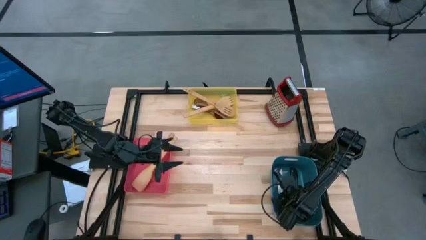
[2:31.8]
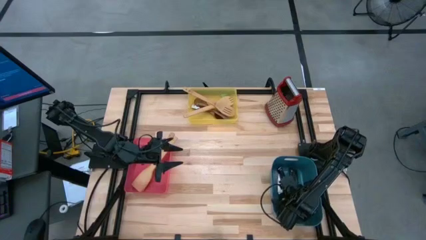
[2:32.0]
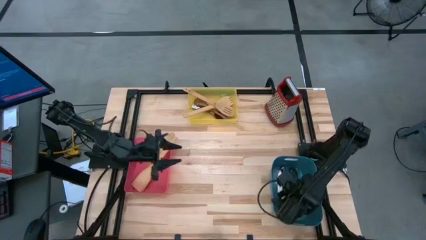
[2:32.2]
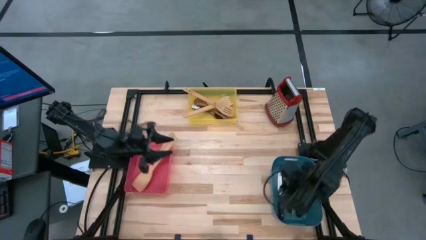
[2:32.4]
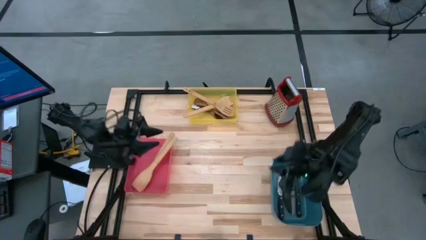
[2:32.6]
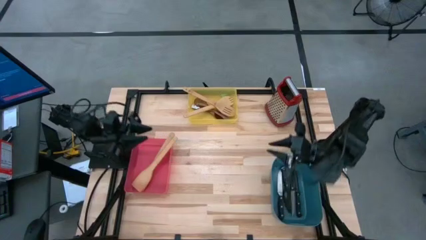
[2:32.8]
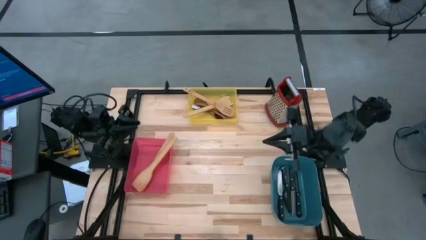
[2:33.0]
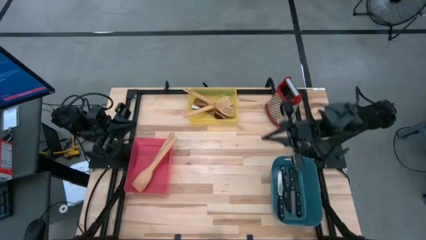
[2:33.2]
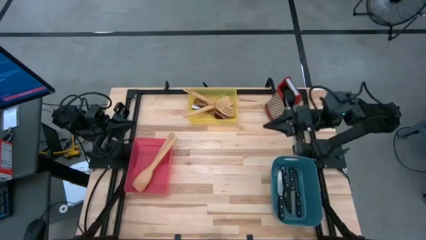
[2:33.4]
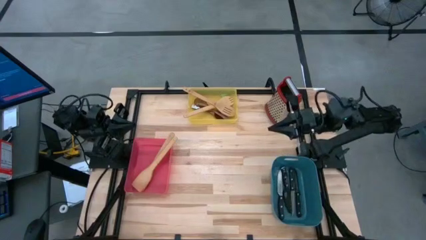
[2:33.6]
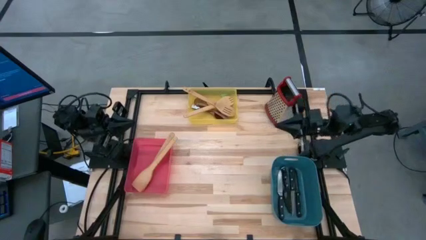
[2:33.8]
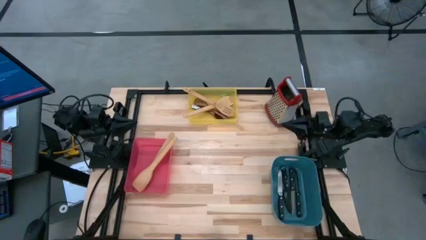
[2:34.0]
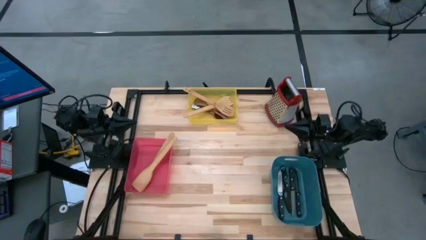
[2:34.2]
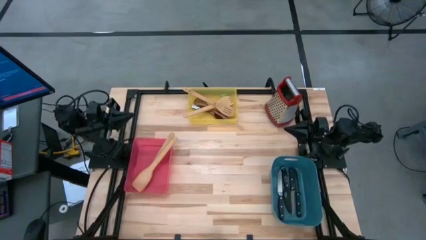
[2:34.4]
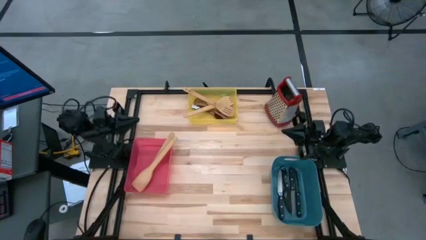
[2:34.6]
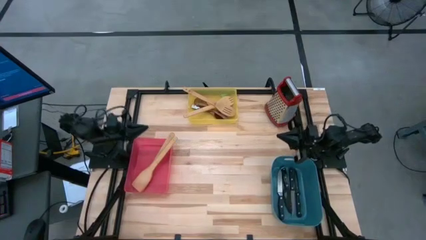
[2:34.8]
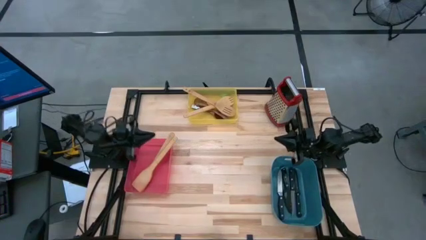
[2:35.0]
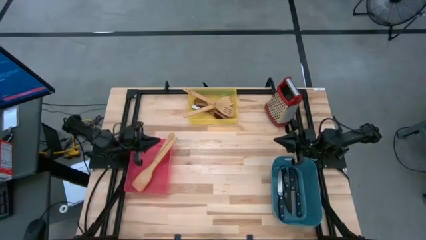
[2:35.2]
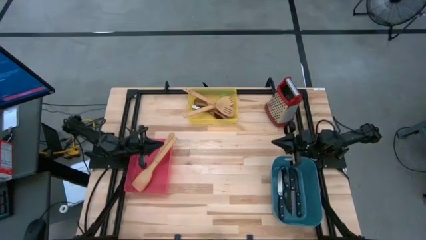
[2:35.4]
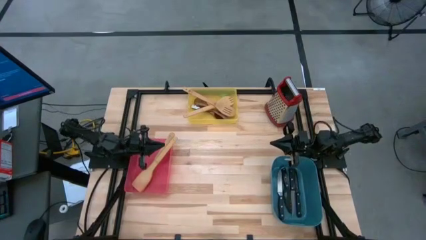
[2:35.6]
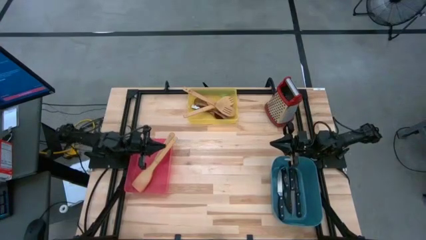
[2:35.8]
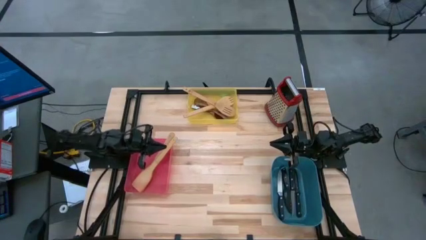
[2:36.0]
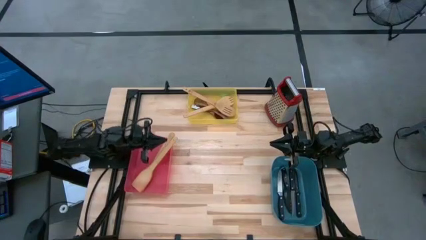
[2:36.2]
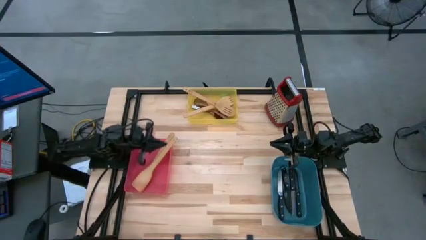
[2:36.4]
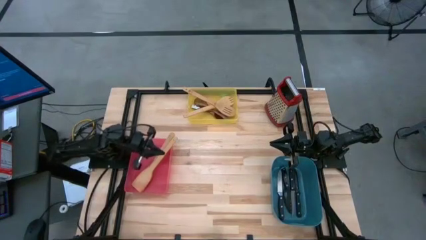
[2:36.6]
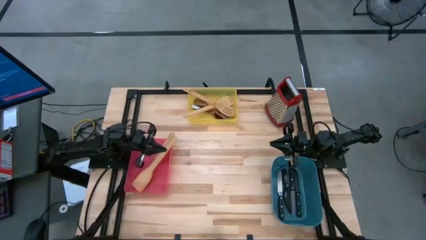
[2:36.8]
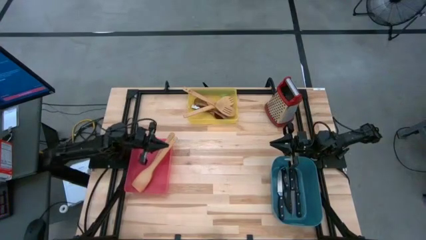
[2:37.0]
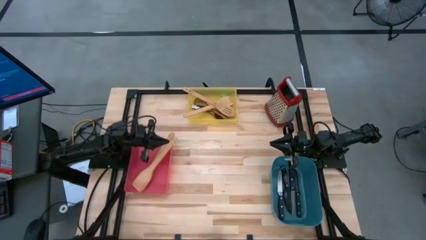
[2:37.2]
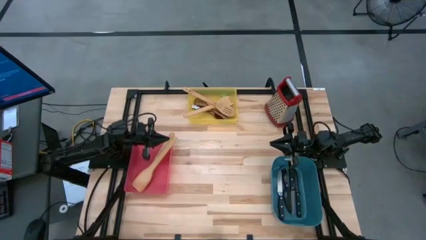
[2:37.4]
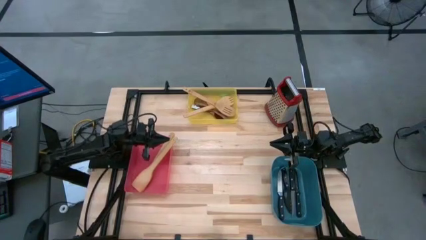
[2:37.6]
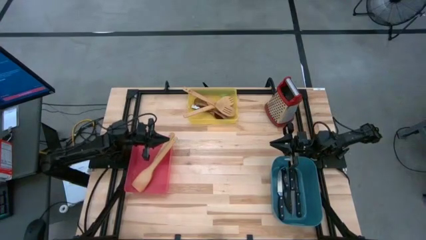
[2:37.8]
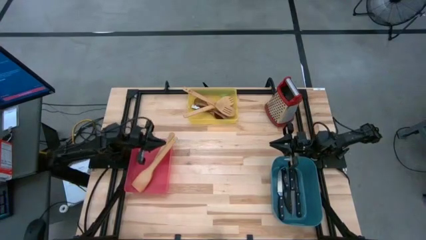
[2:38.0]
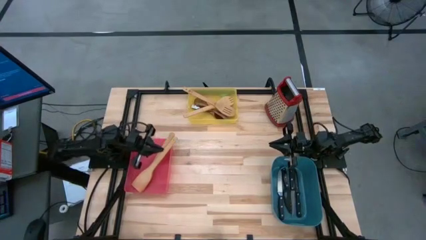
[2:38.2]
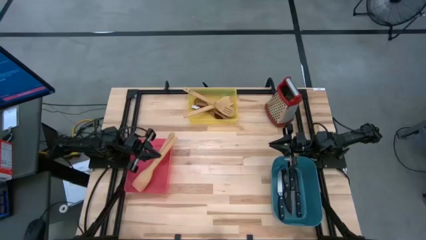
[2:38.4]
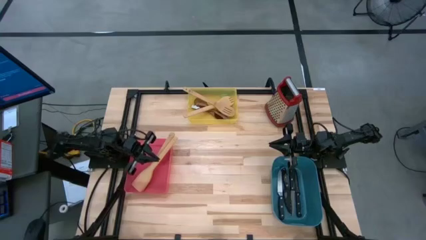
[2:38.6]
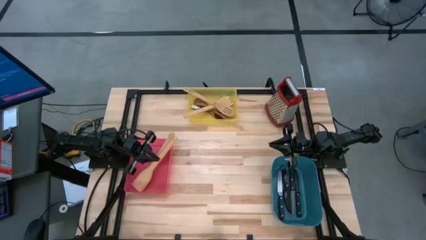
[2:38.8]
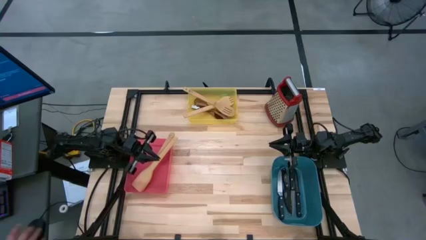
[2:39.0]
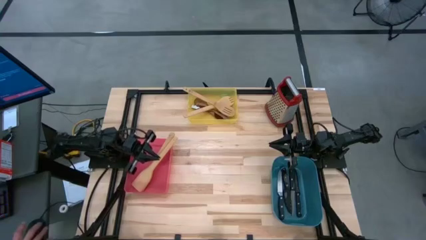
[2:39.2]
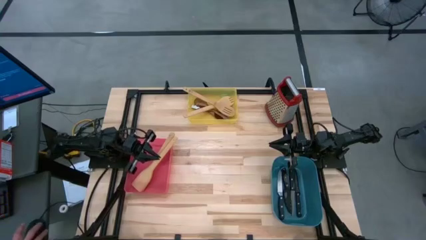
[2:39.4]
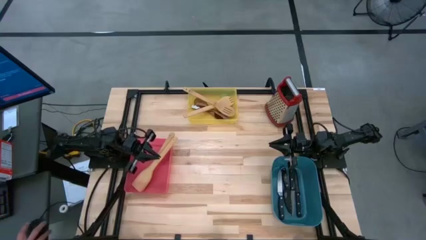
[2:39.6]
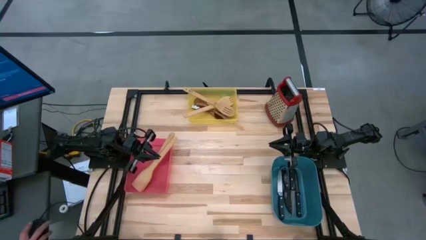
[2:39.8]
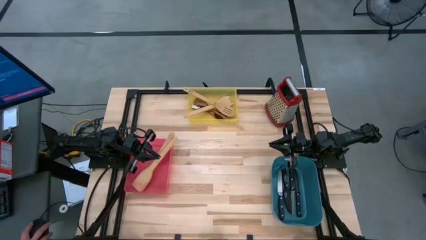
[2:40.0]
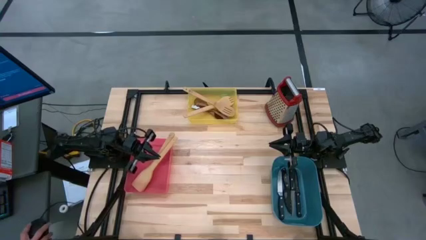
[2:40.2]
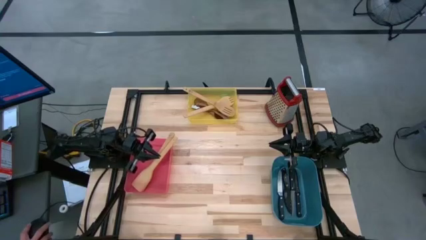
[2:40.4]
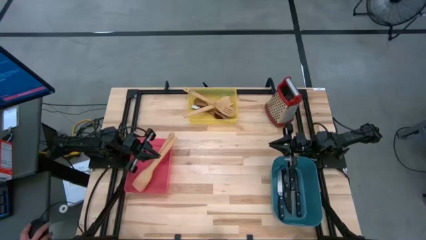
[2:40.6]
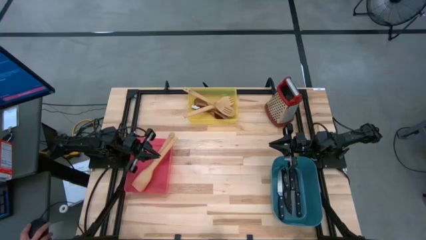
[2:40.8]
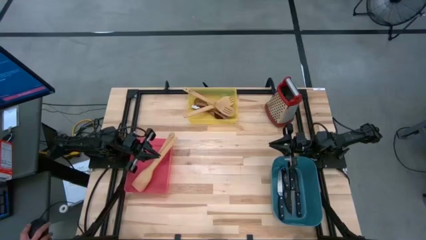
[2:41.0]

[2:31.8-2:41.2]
Task: Pick & Place Kitchen Items
Return to Home Position

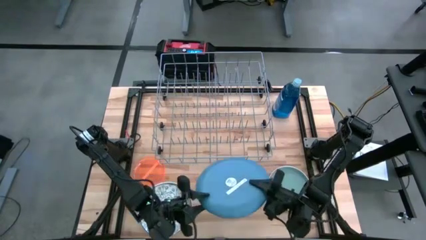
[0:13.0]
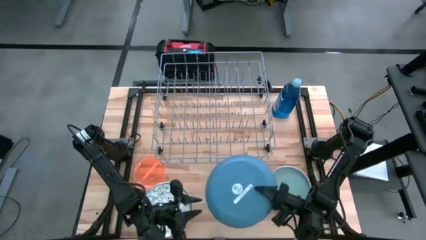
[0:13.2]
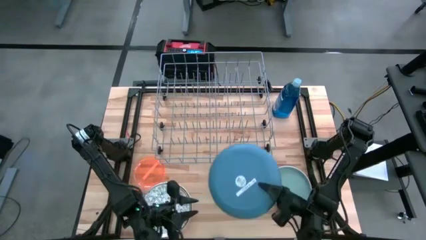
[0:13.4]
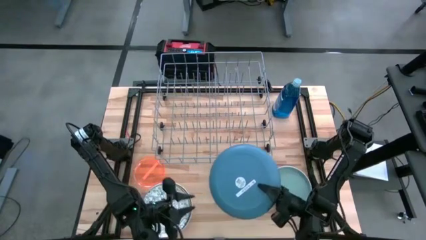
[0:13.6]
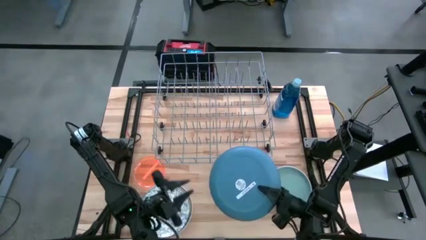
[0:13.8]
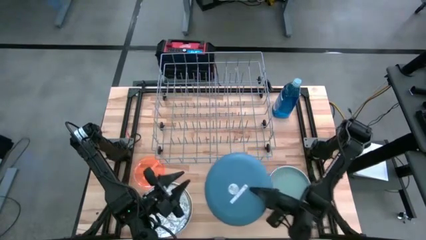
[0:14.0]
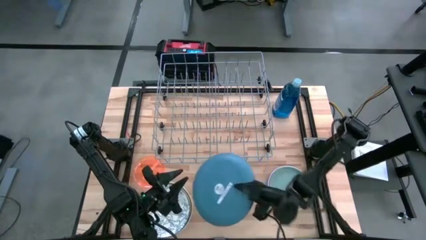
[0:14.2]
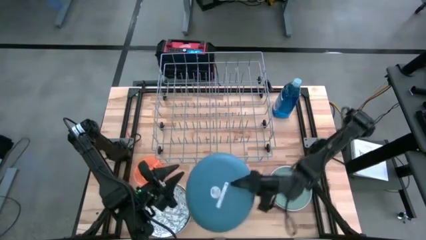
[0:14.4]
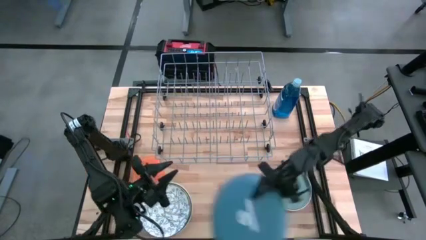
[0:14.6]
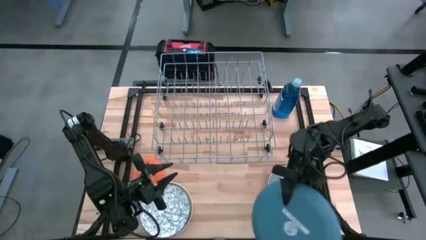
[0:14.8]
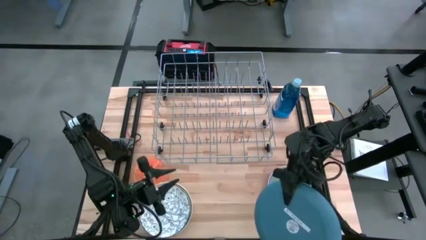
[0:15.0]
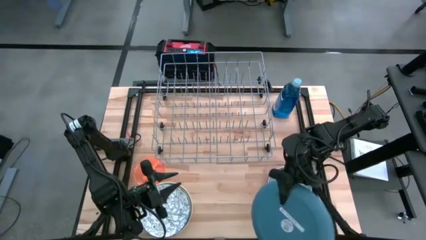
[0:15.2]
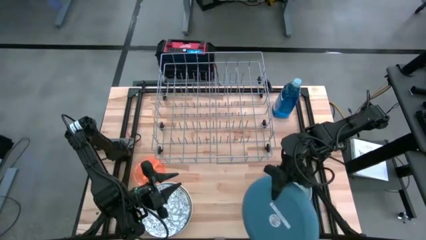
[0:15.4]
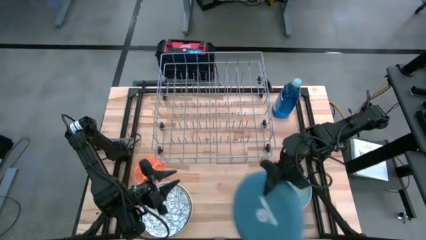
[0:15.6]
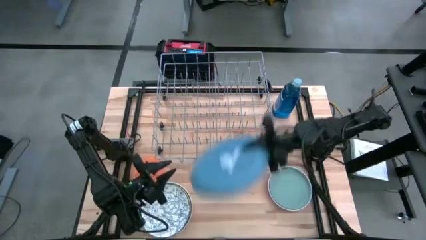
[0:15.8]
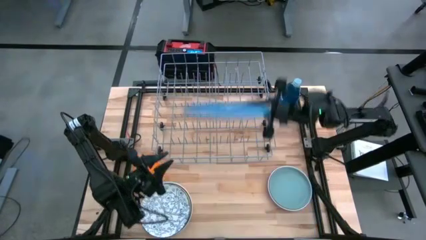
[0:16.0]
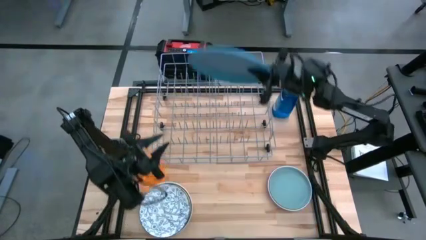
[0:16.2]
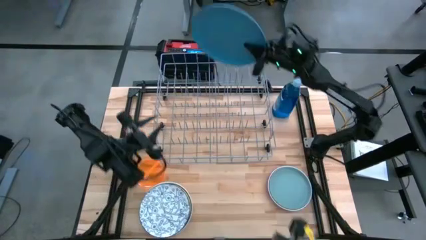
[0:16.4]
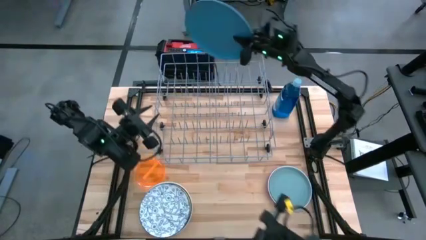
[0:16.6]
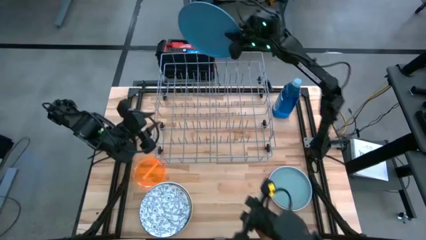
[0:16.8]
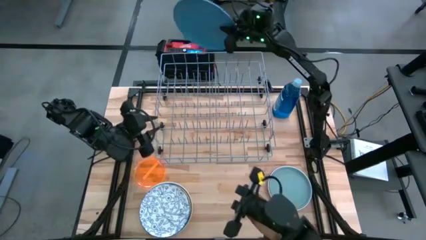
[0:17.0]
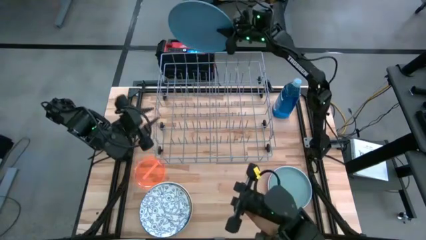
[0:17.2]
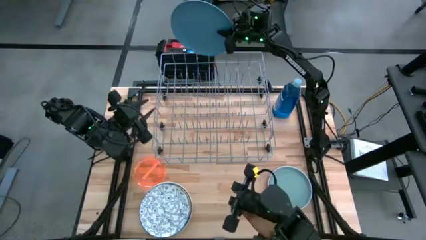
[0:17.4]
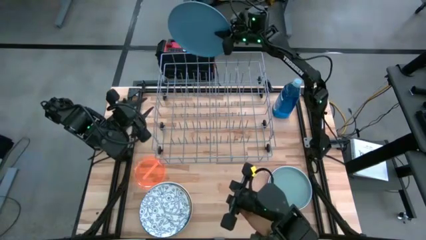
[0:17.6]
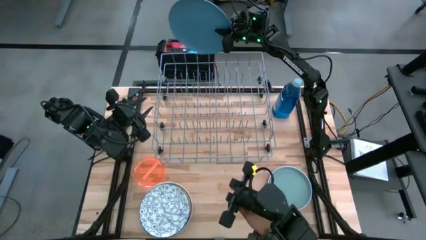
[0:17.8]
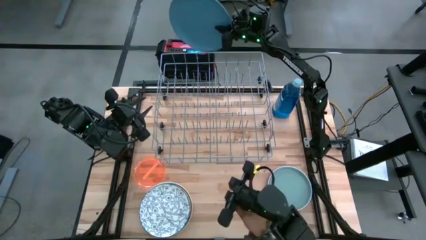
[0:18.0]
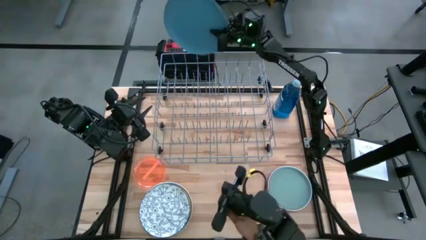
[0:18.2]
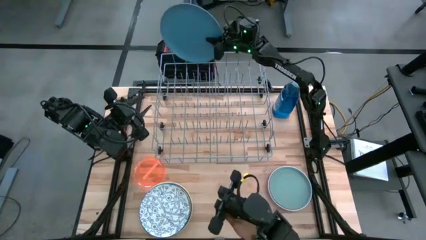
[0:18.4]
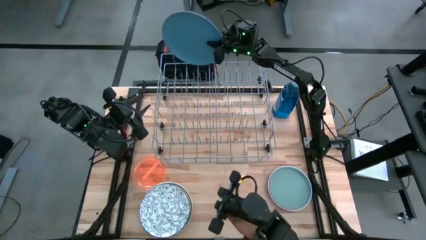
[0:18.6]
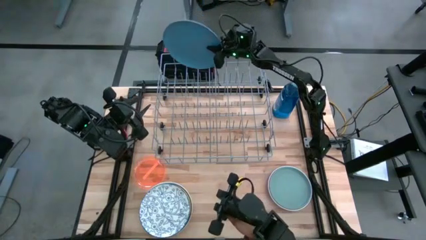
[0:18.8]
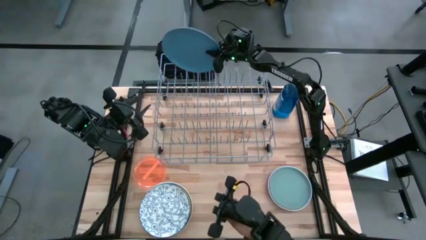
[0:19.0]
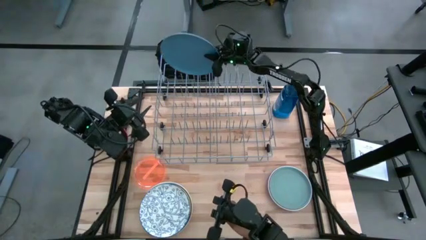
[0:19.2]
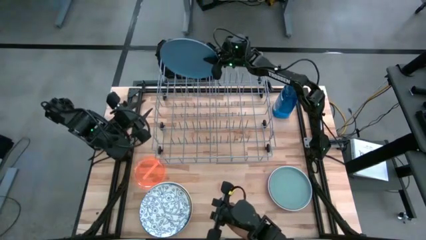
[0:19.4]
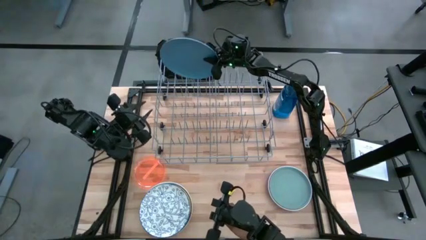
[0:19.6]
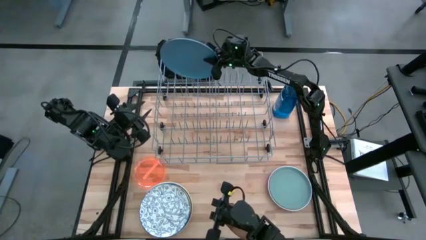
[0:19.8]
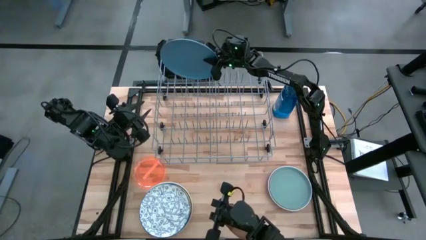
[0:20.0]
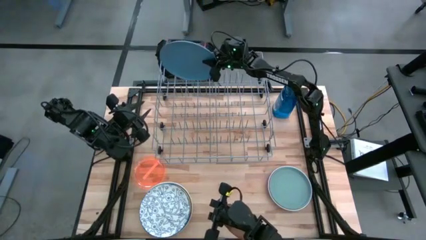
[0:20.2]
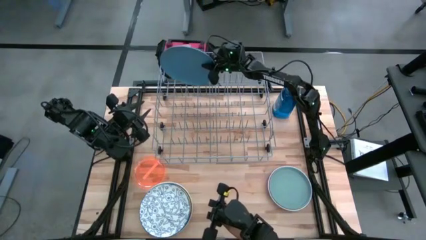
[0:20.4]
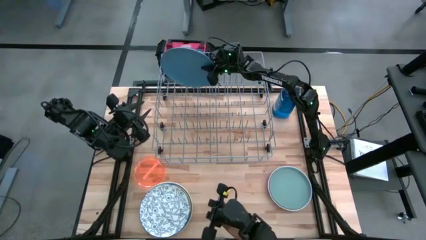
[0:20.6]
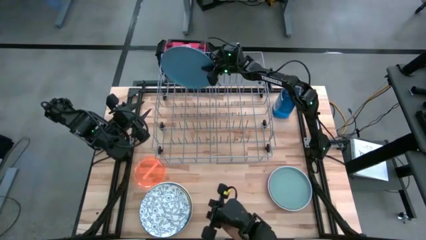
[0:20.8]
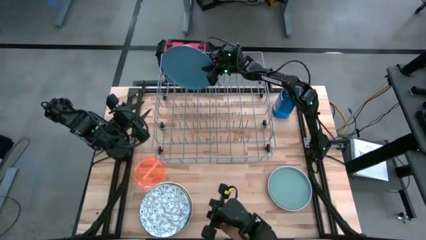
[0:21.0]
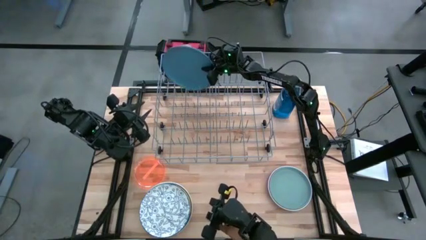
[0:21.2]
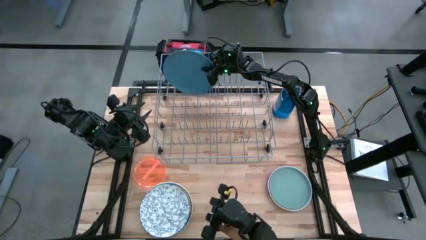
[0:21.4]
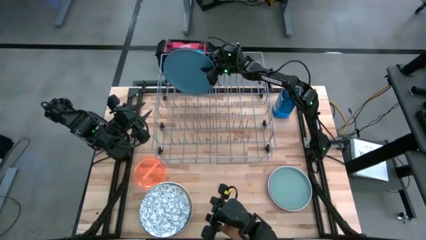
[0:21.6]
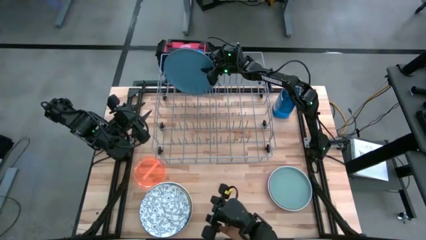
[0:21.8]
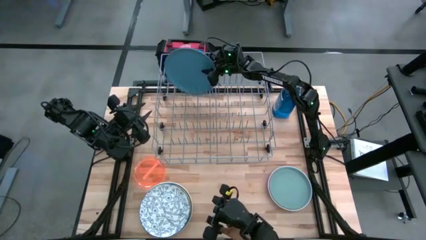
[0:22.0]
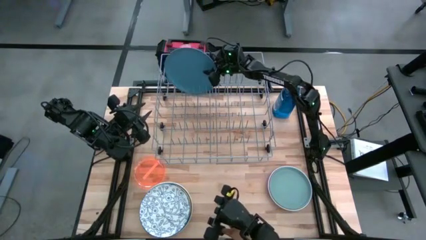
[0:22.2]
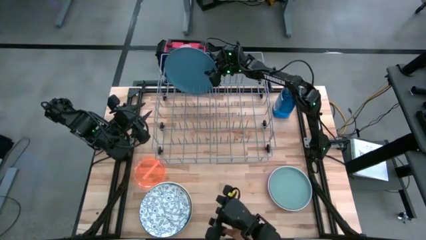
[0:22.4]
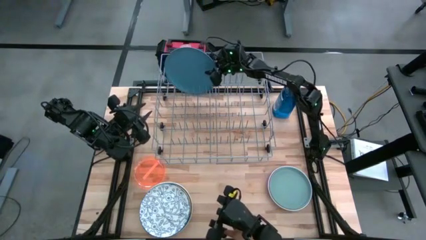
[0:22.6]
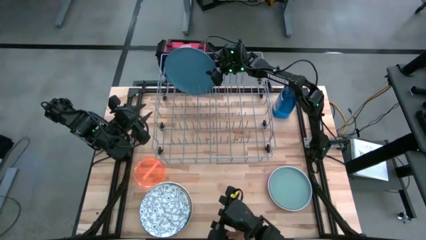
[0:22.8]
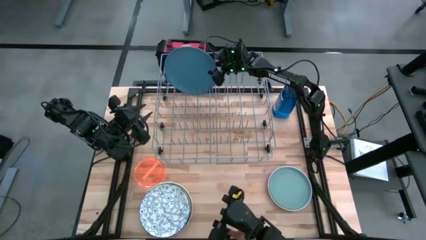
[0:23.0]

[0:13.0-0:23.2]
Task: Sort dishes
Put the blue plate in the dish rack
